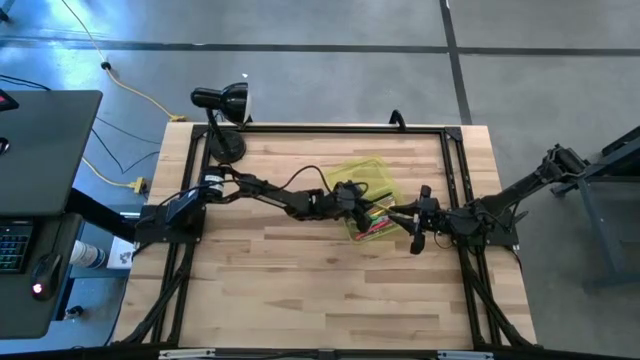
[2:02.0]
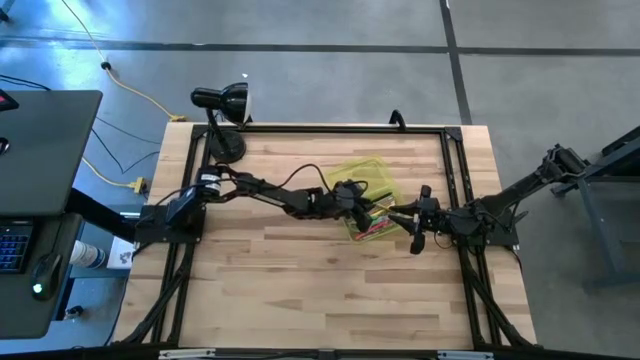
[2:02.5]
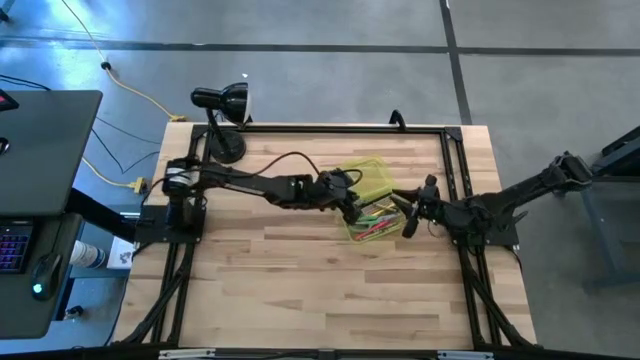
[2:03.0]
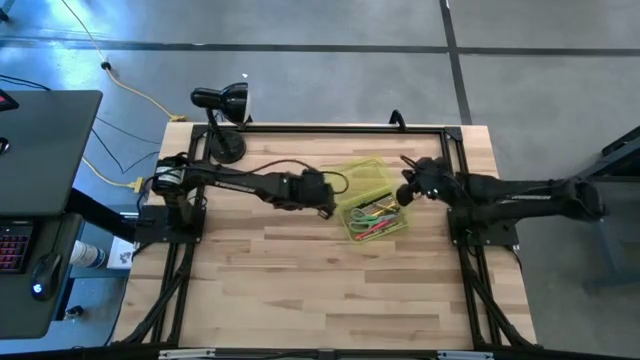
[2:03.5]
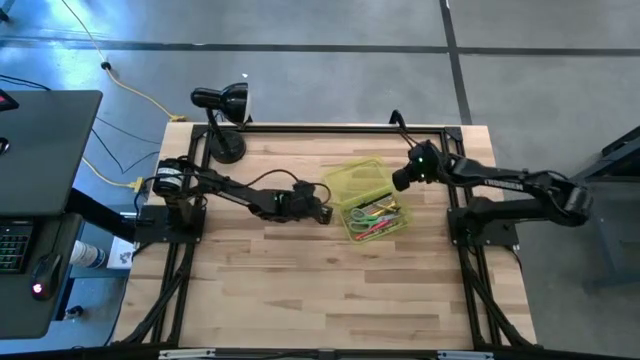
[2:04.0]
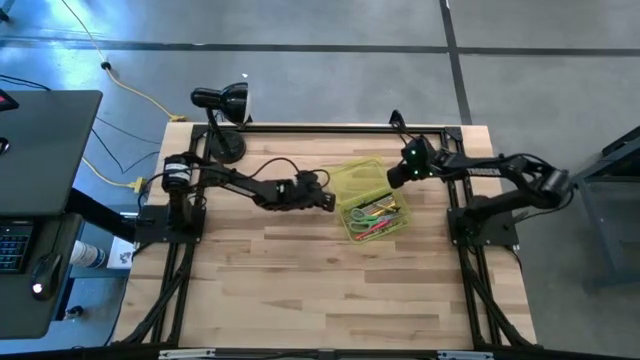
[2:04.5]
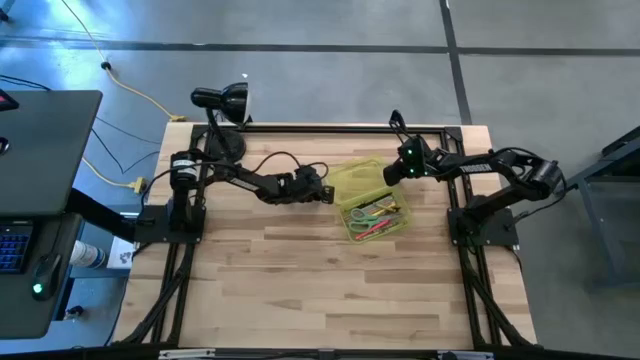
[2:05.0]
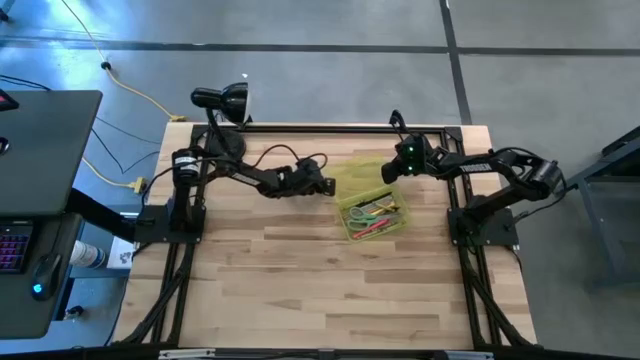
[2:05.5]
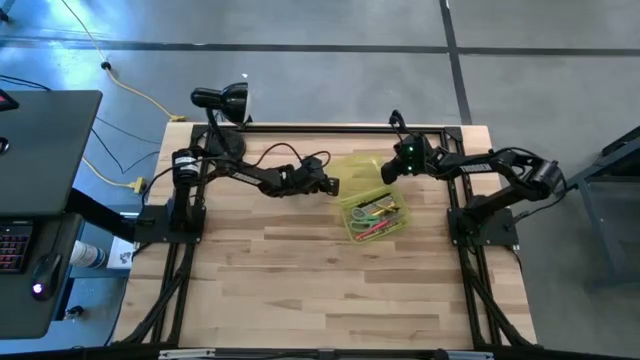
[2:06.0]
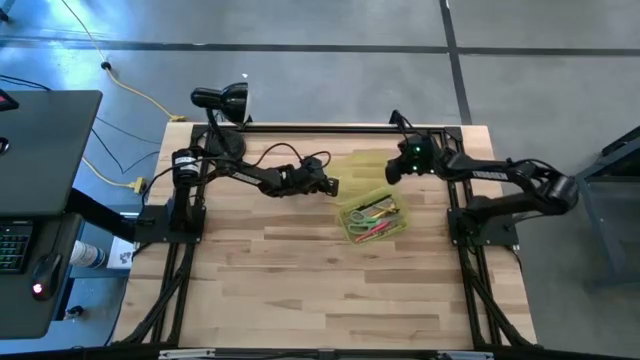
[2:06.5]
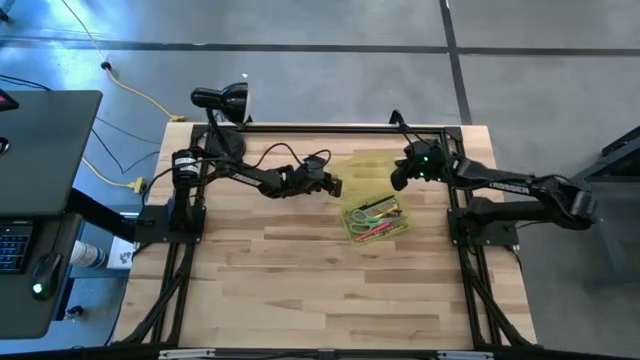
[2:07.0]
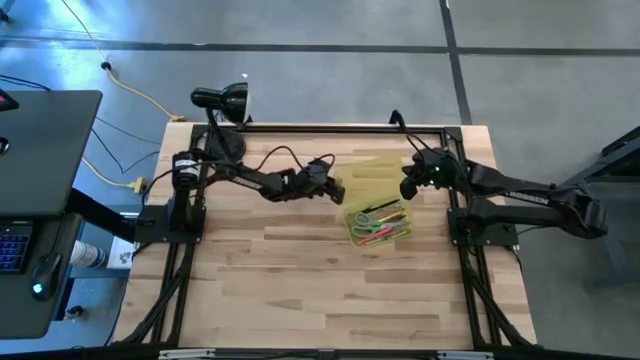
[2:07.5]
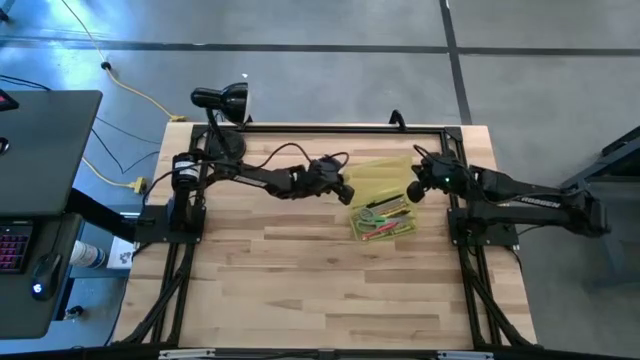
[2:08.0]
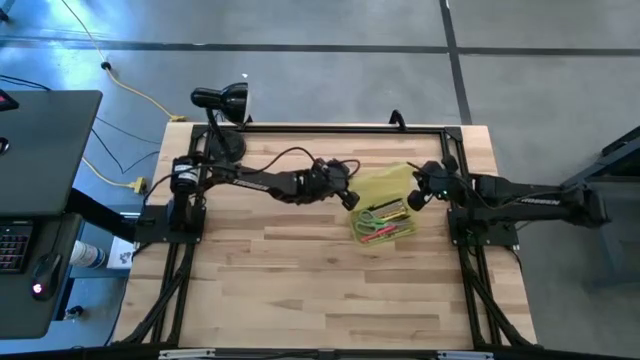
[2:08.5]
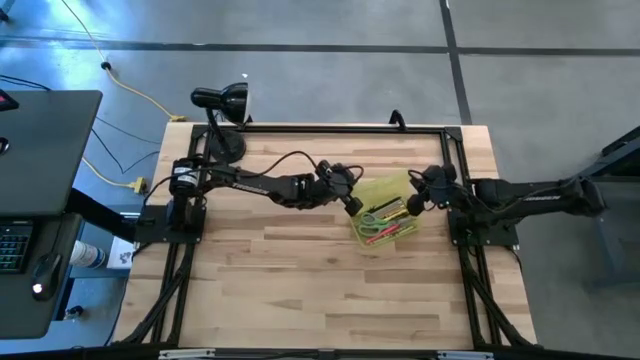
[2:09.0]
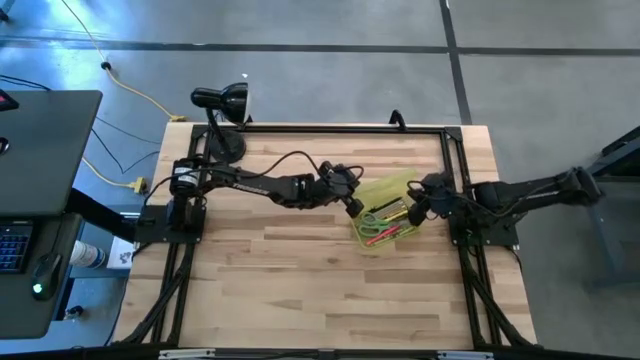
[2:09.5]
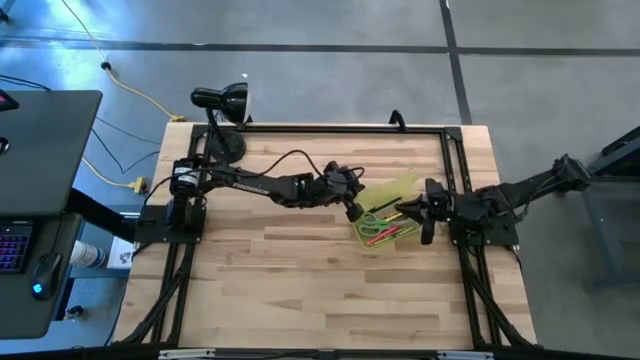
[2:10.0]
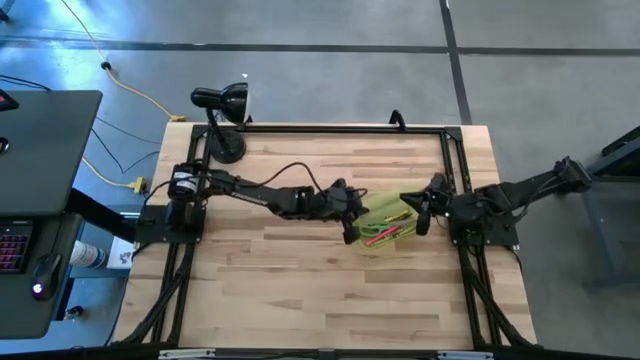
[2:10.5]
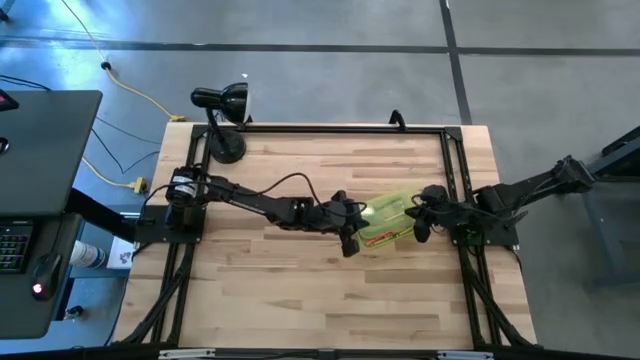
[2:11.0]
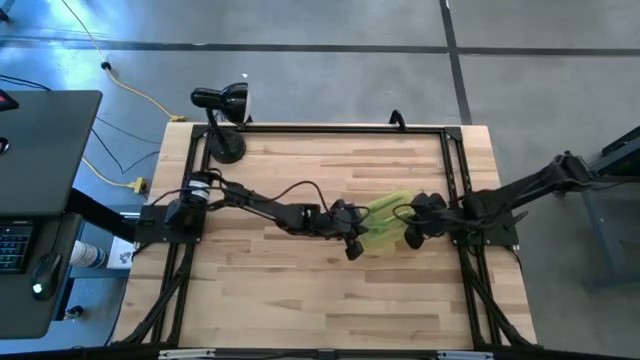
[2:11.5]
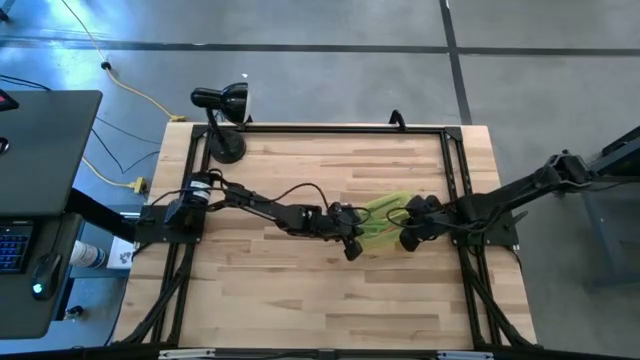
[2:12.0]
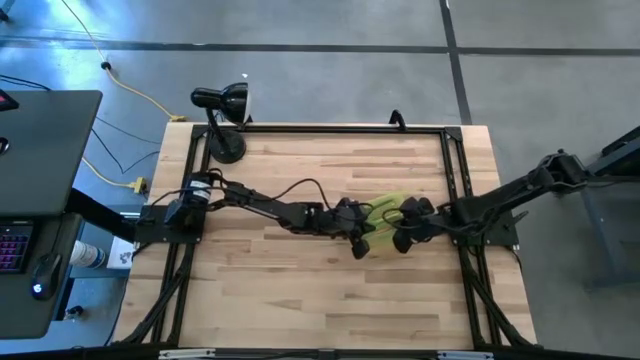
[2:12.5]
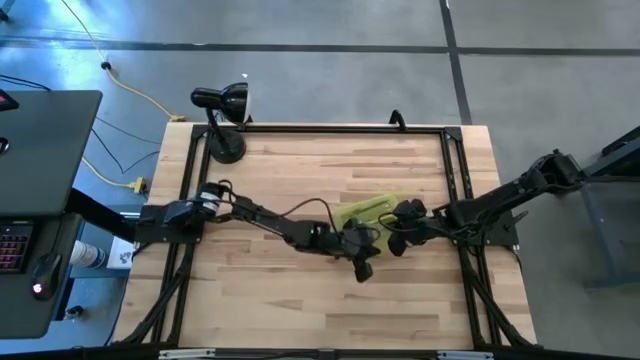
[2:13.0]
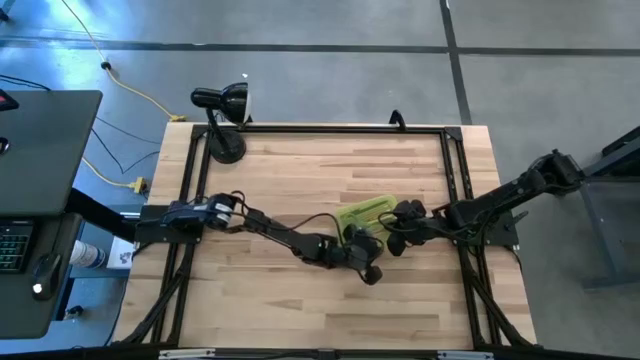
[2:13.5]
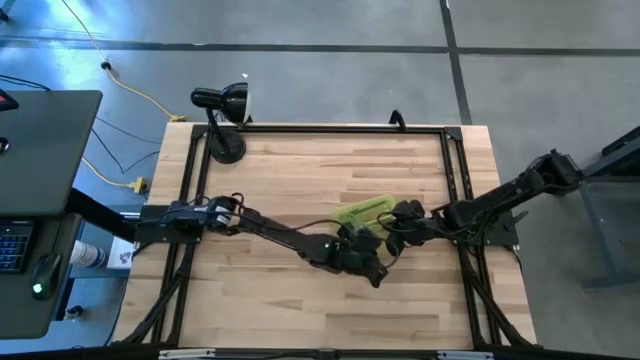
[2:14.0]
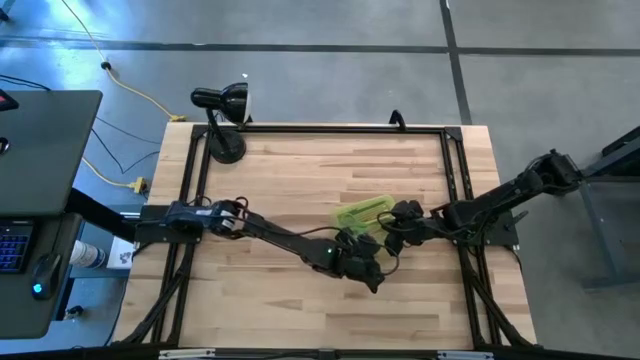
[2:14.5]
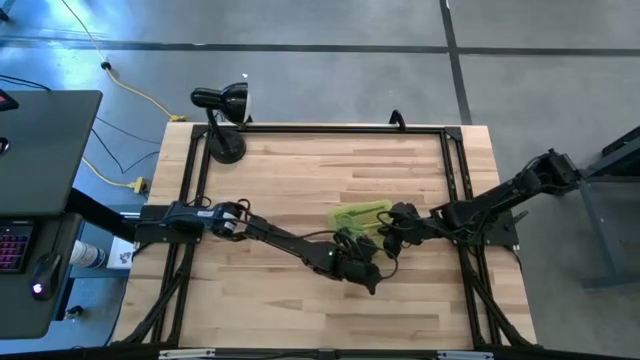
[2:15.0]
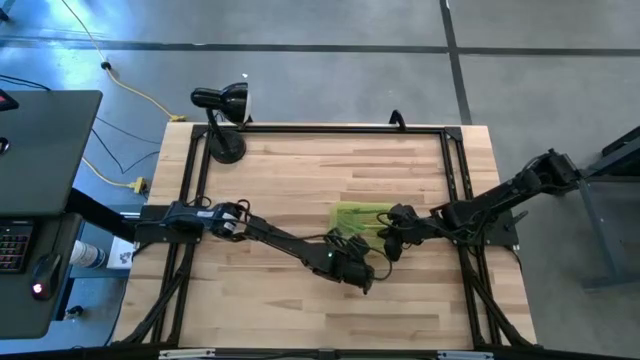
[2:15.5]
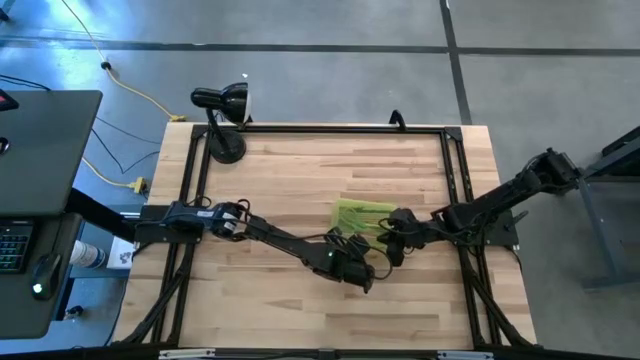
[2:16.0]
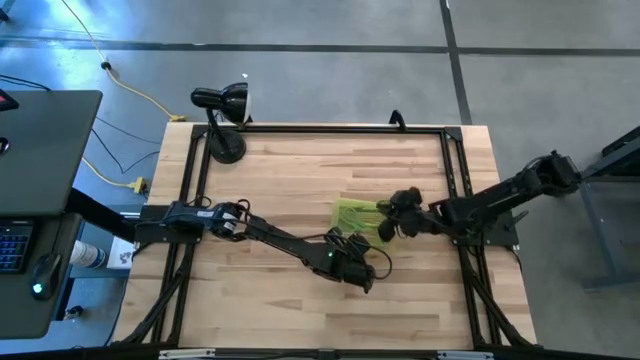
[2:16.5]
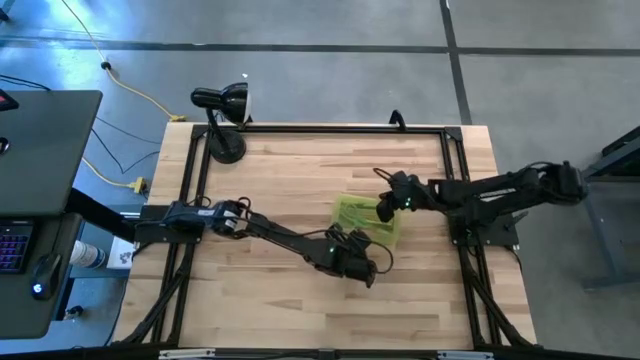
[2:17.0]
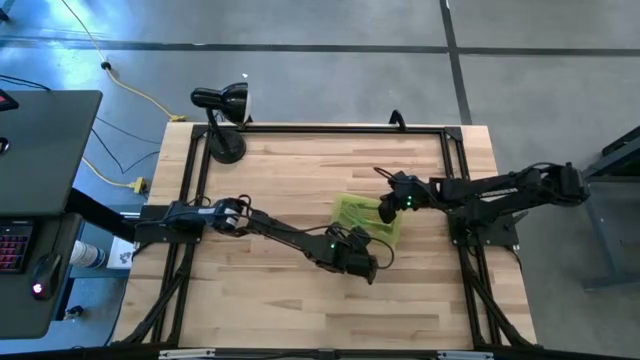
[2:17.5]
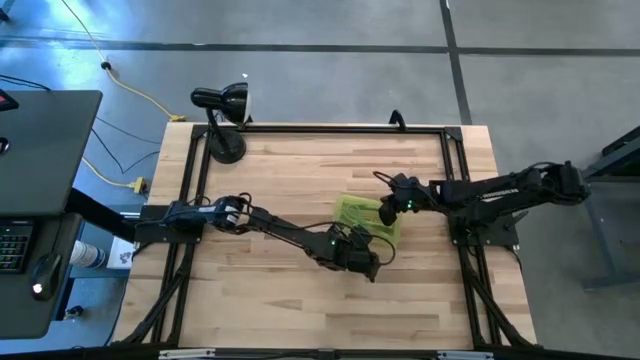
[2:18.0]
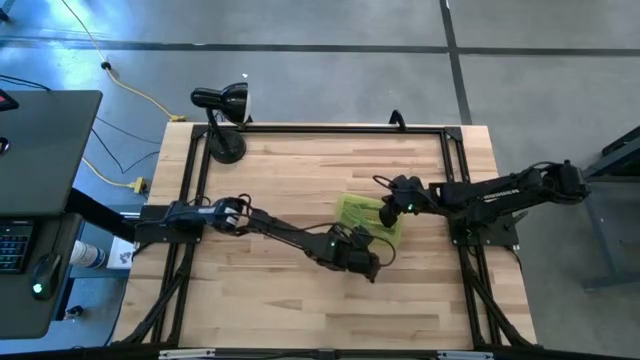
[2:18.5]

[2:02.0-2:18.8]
Task: Pick & place school supplies into a supply box
Close the yellow supply box

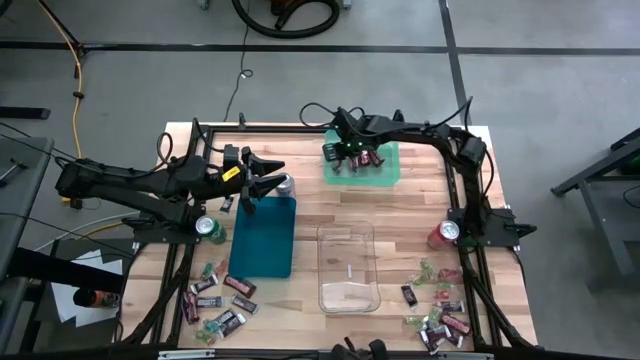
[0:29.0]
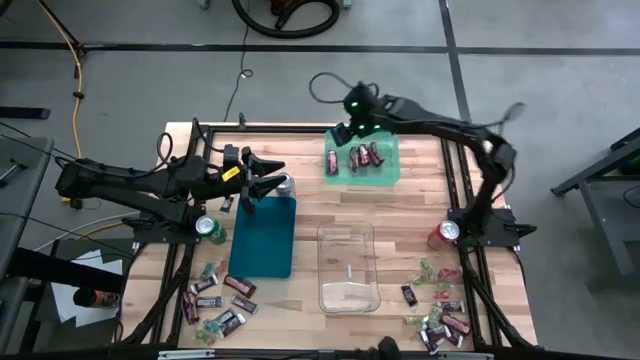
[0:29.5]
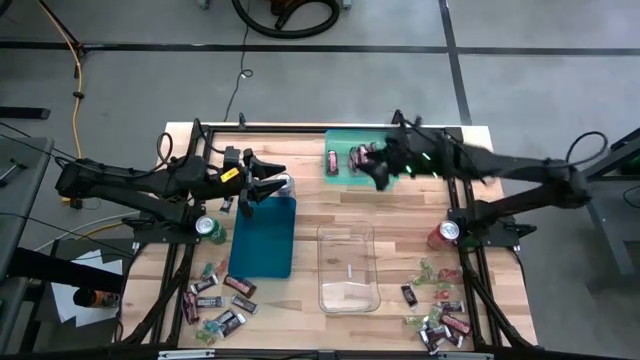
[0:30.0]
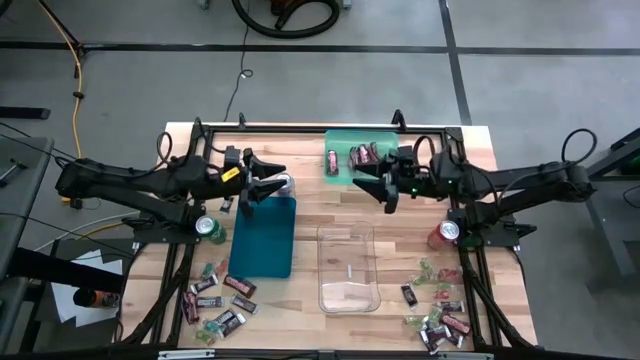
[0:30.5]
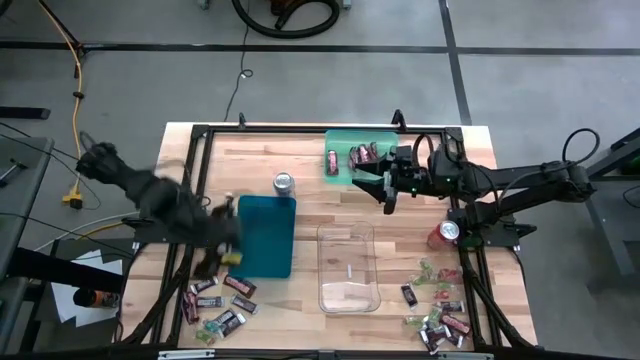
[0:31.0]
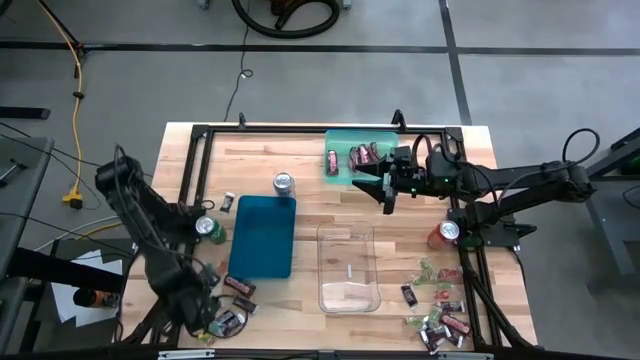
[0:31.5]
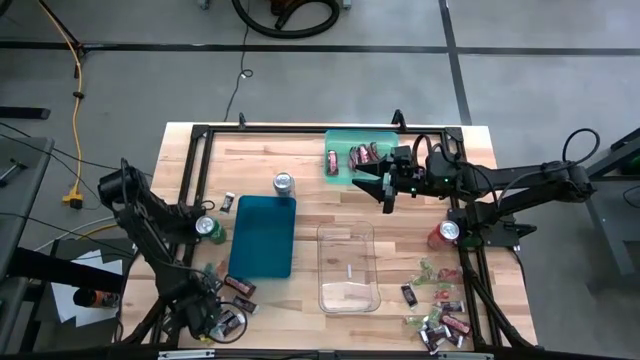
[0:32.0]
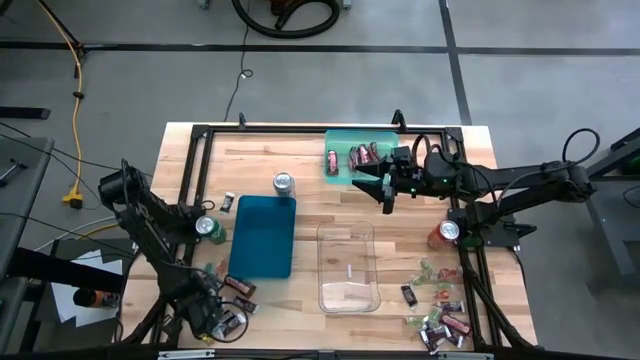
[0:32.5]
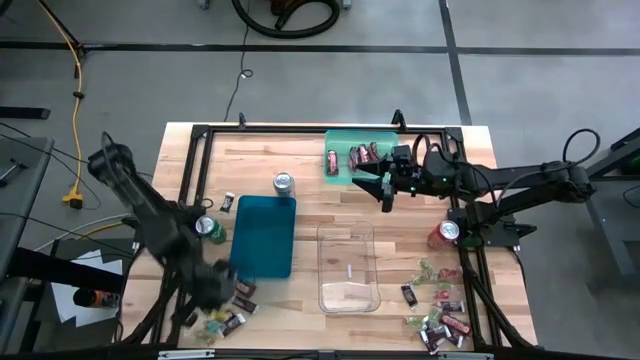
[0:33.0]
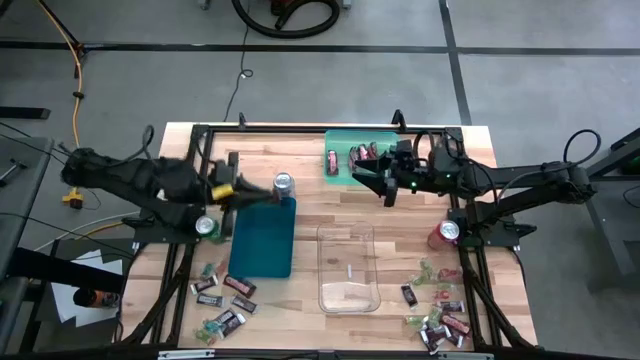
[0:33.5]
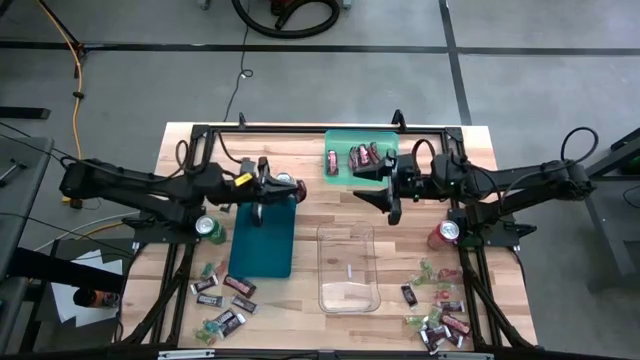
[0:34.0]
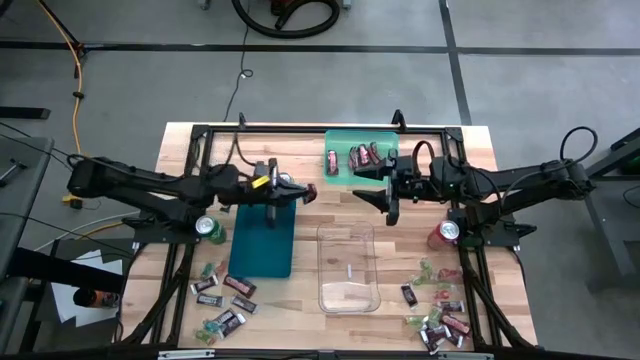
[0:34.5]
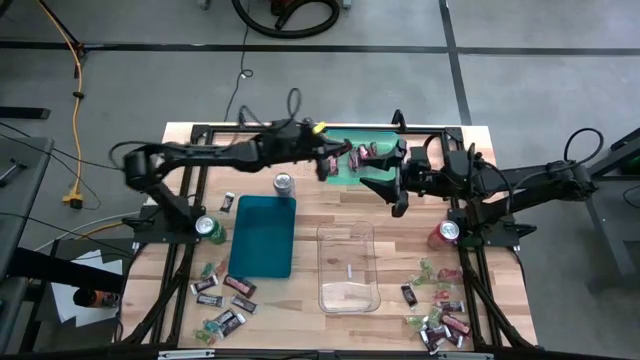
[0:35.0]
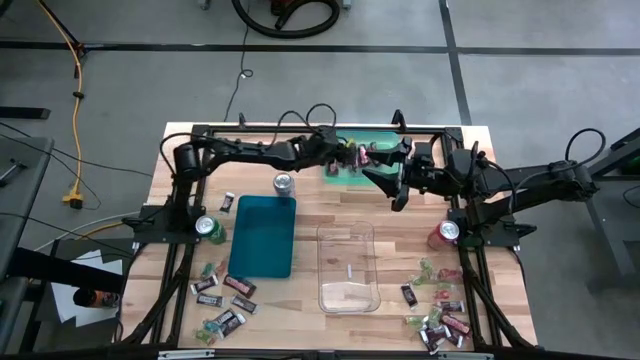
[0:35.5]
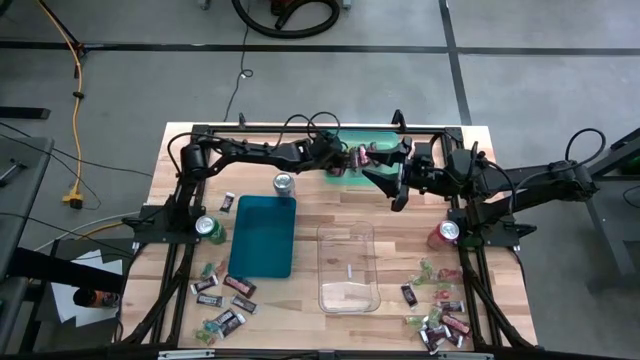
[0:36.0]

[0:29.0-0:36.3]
Task: Sort candy
Put the chocolate peanut bar into the green bin
